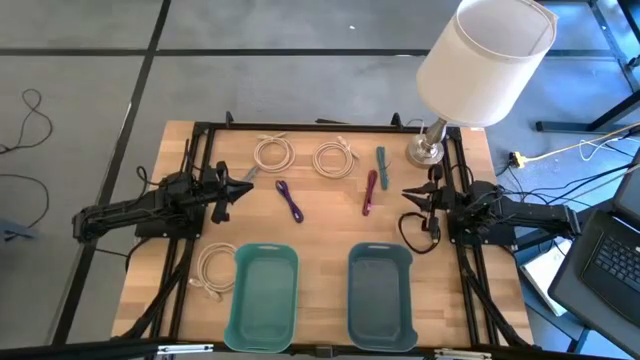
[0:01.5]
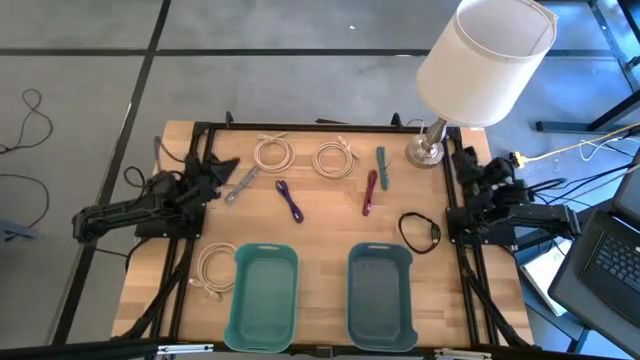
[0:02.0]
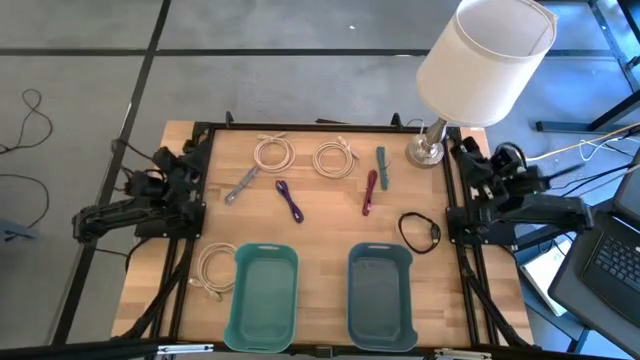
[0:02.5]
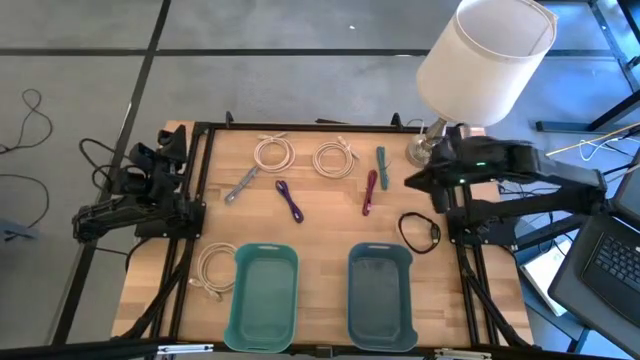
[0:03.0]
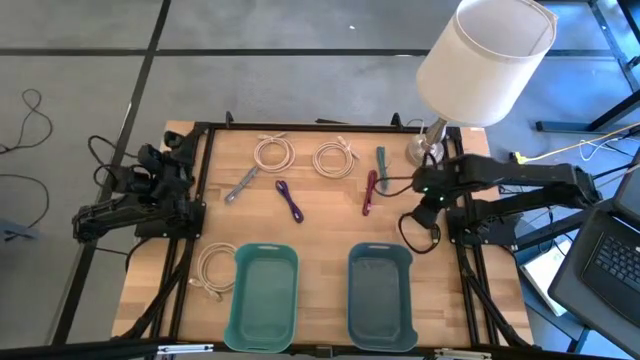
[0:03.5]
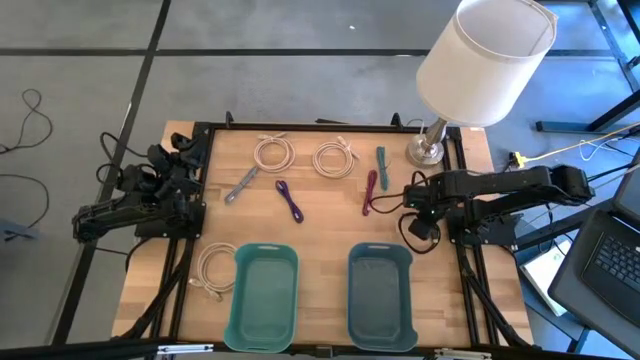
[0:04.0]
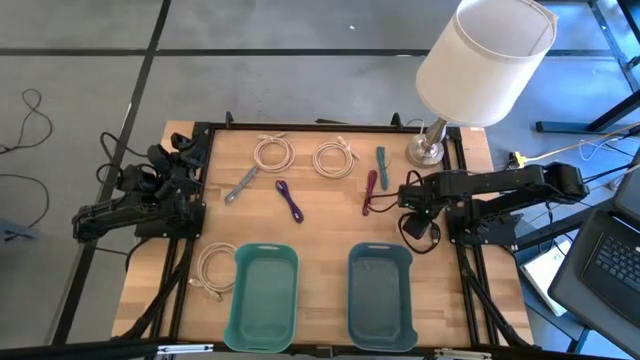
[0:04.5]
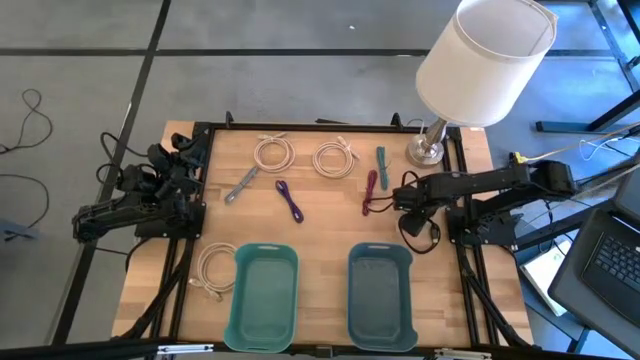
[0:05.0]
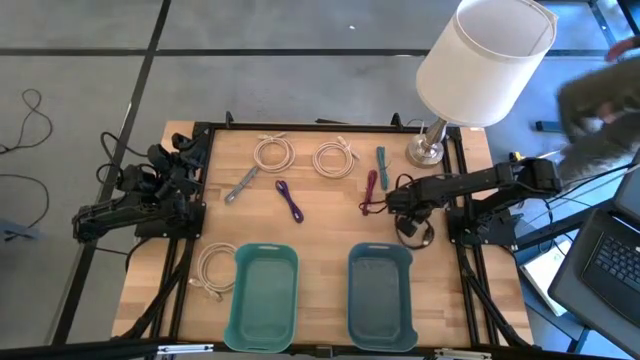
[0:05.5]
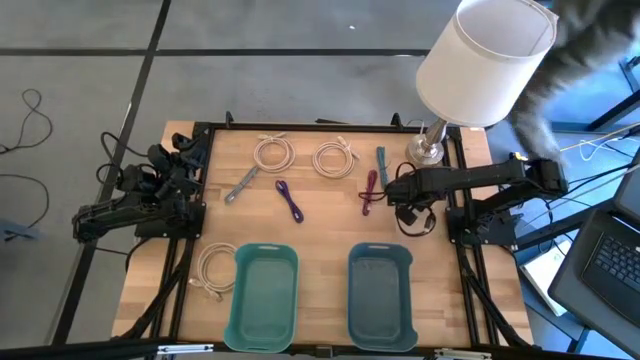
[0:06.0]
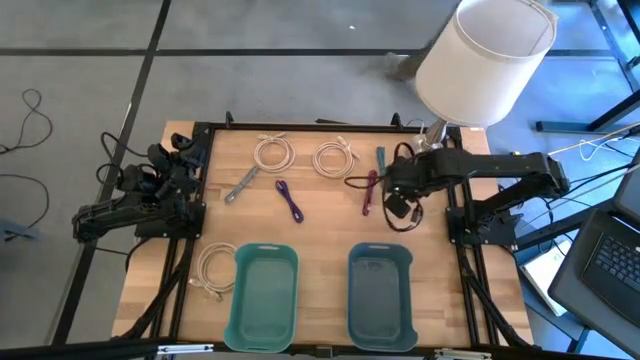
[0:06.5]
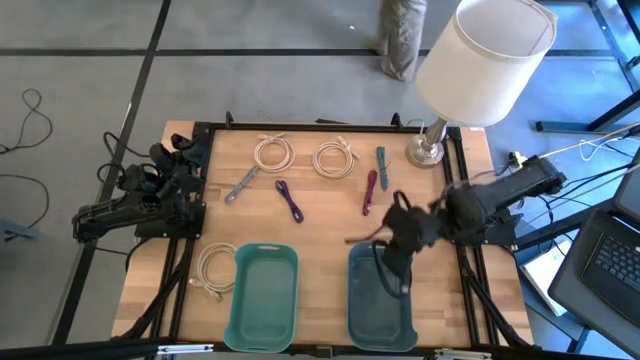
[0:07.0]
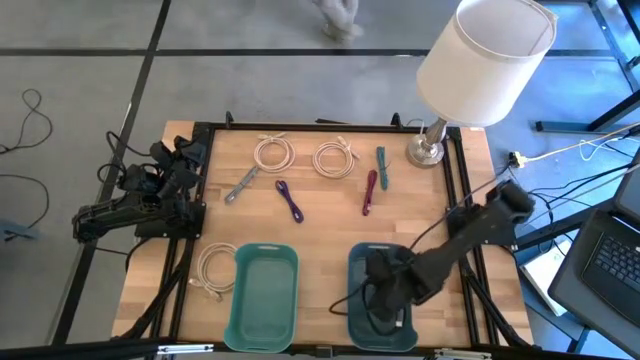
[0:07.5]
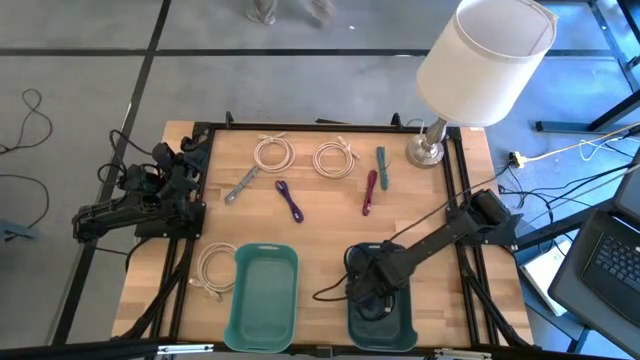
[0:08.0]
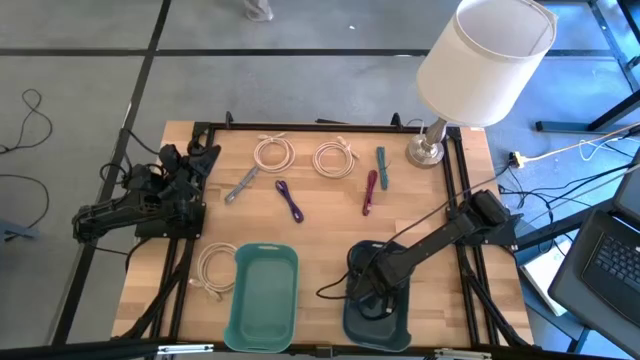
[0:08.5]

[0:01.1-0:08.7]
Task: Pick and place USB-C Cables
Put the large black USB cable into the blue bin

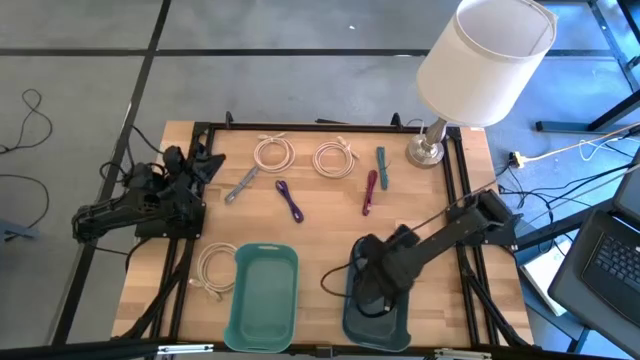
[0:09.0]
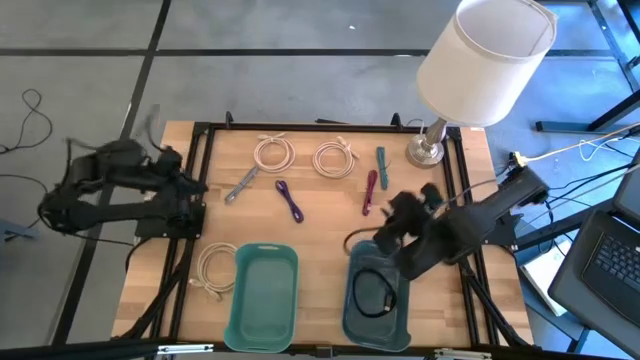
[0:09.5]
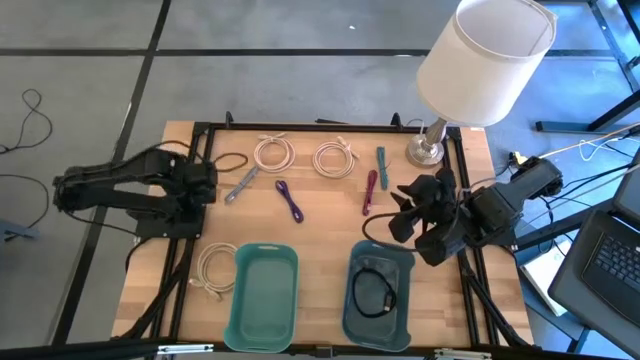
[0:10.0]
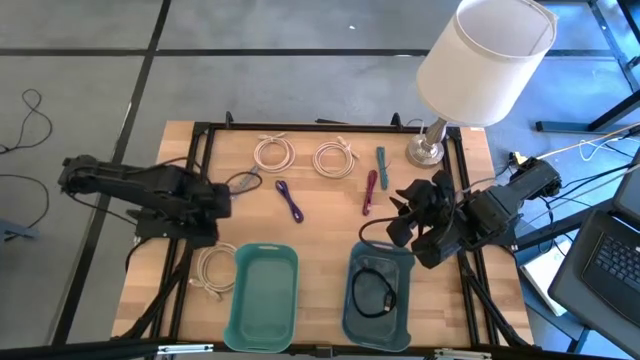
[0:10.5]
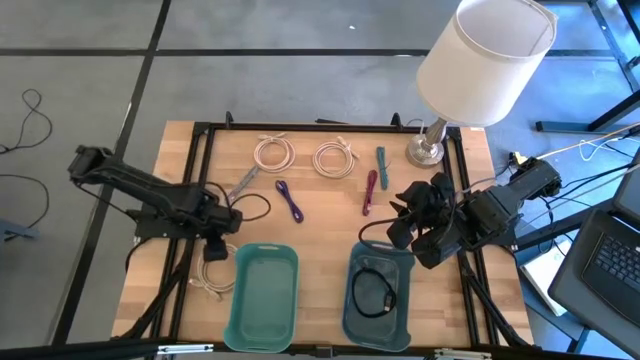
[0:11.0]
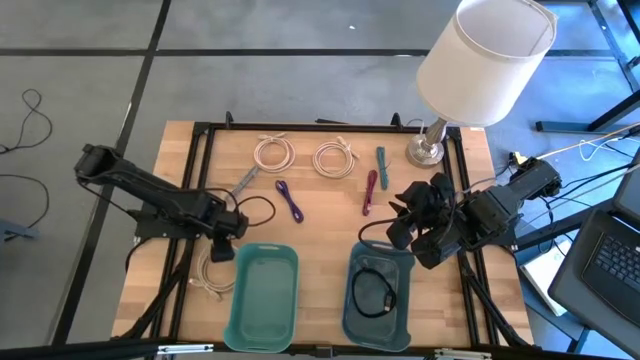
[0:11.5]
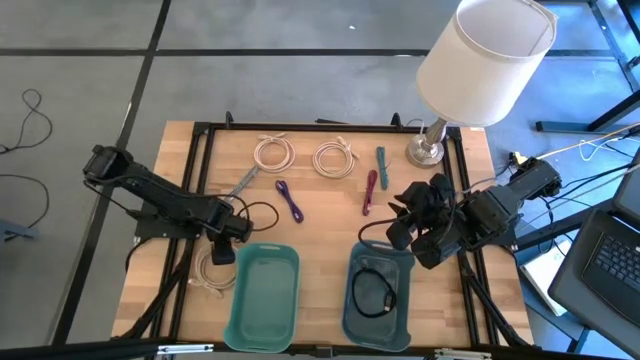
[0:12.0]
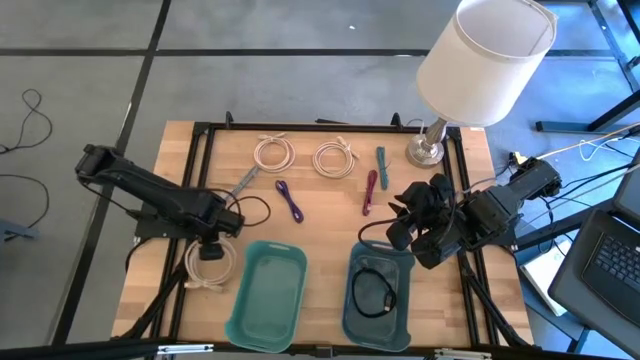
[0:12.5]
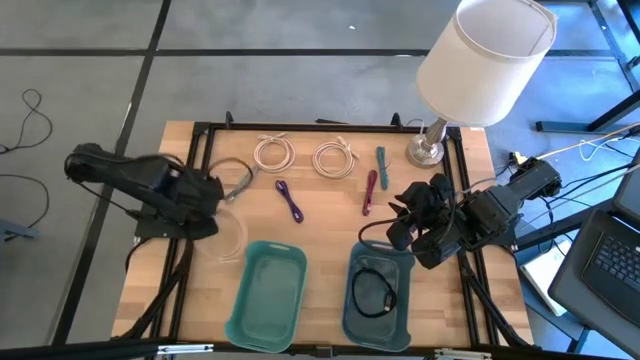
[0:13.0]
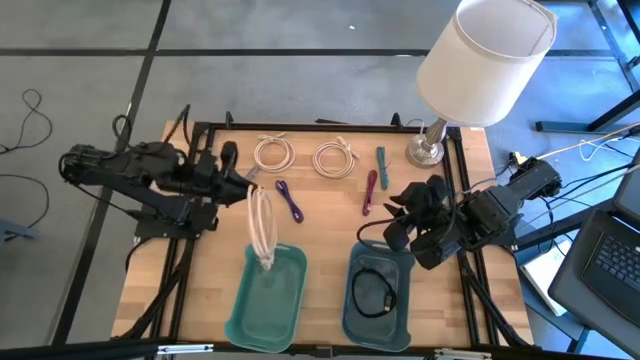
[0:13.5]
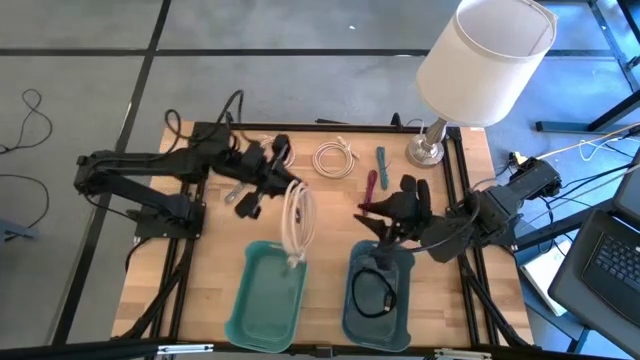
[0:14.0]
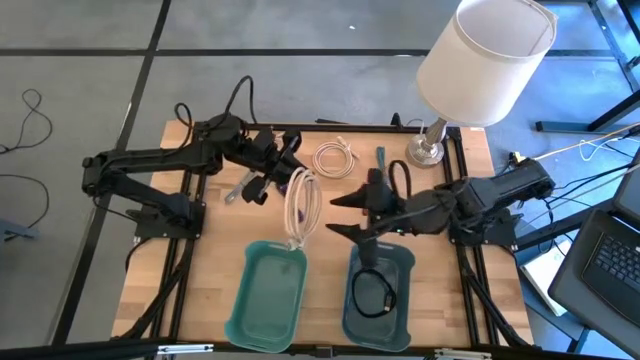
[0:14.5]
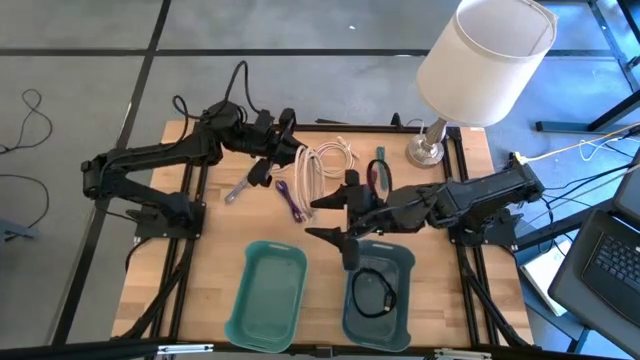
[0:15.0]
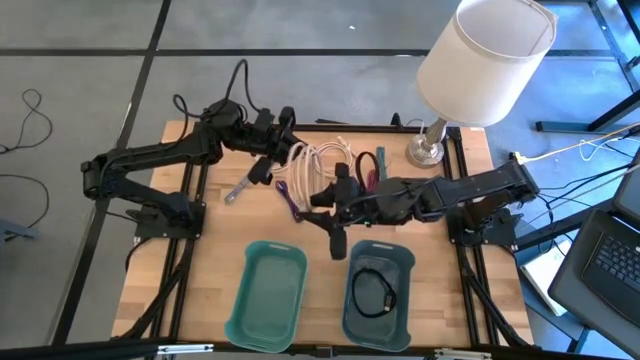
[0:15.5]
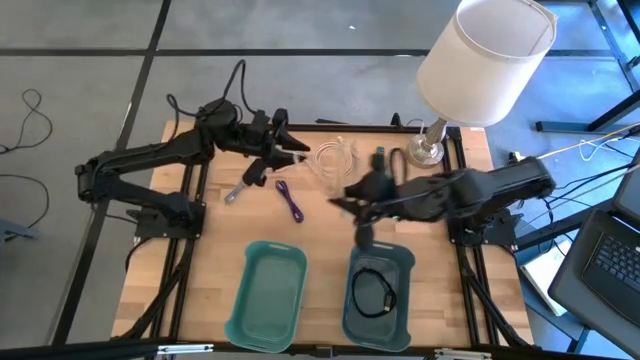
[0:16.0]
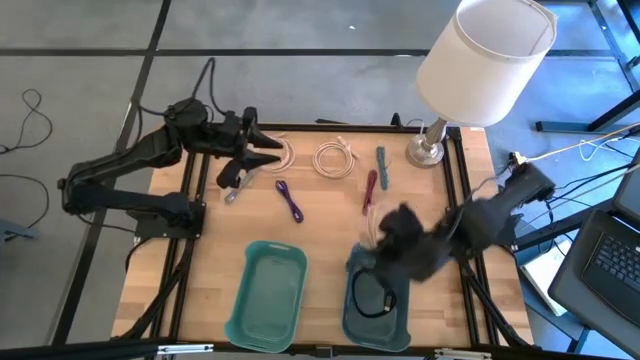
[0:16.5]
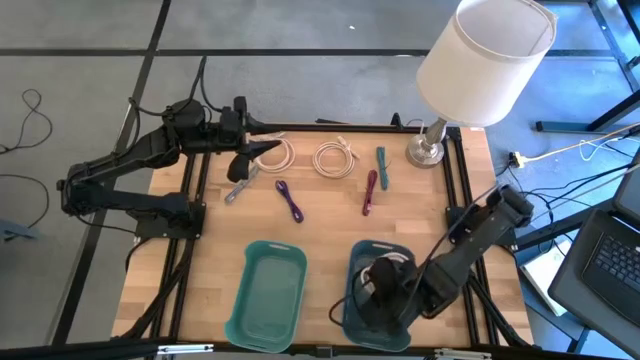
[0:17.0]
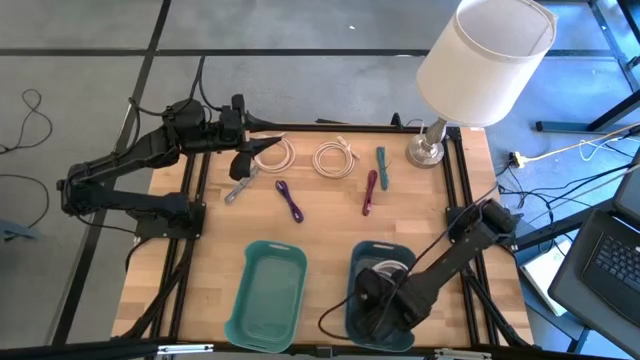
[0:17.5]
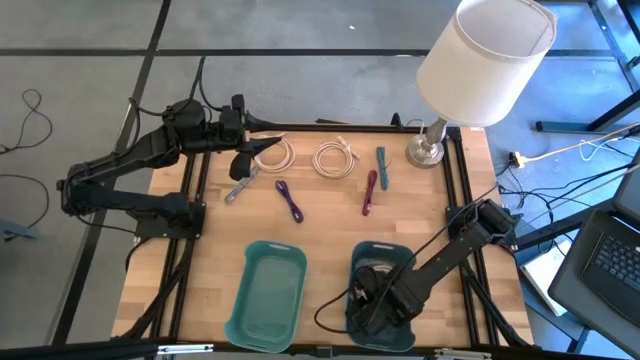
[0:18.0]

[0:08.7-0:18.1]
Put the bottom brown HDMI cable into the blue bin

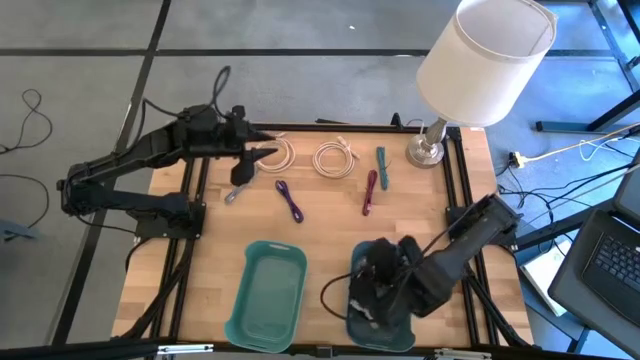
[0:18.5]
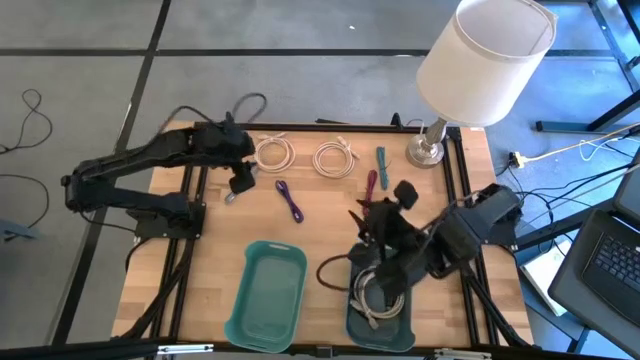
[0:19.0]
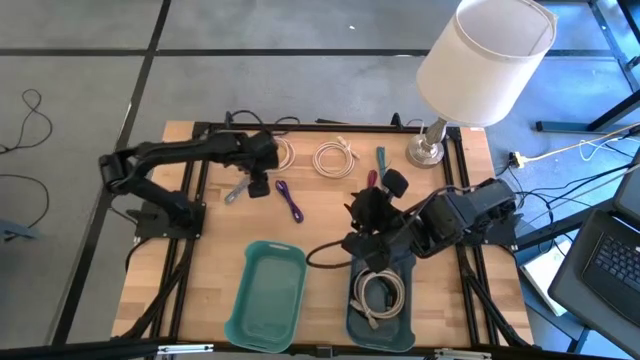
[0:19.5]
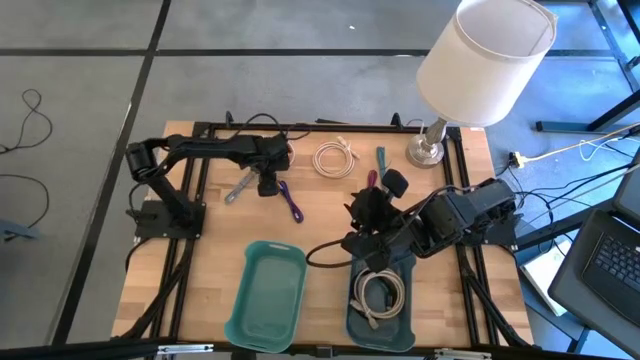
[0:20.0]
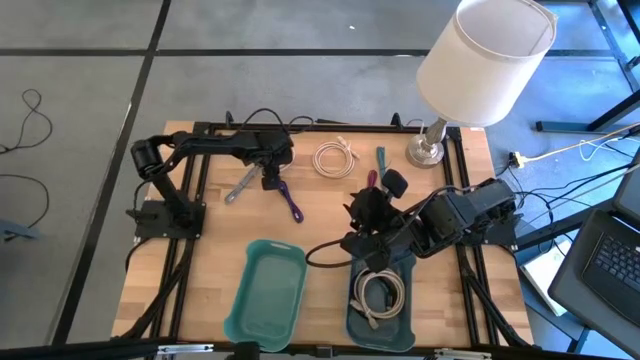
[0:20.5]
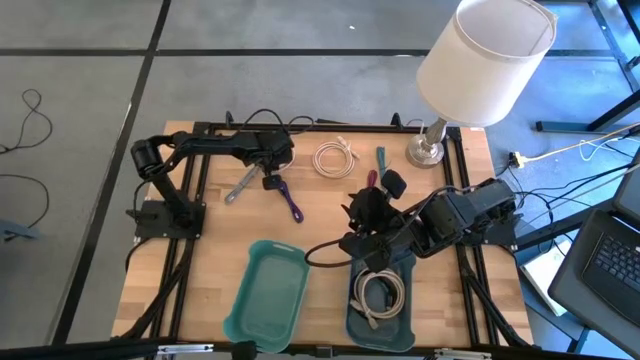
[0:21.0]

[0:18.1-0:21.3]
Put the left brown HDMI cable into the blue bin

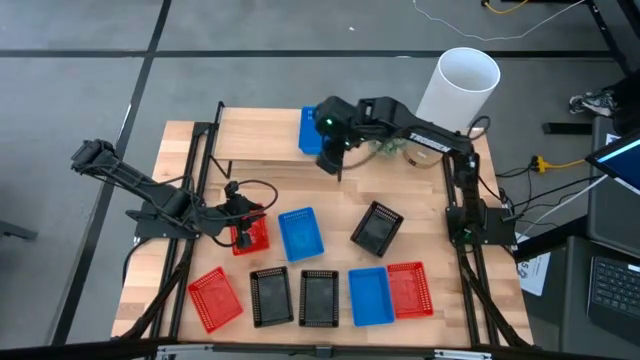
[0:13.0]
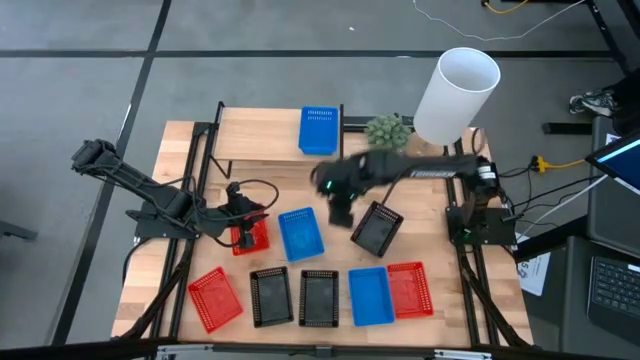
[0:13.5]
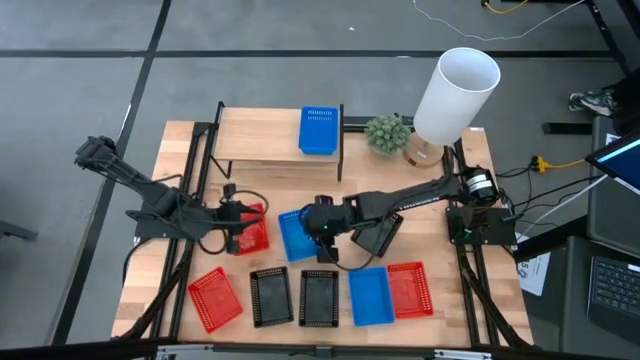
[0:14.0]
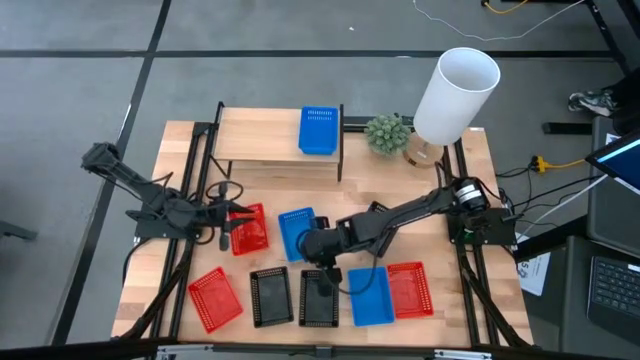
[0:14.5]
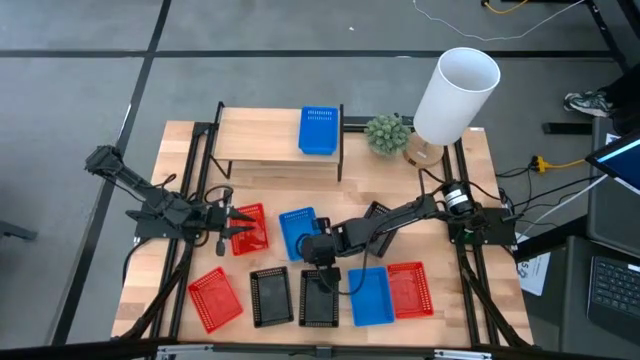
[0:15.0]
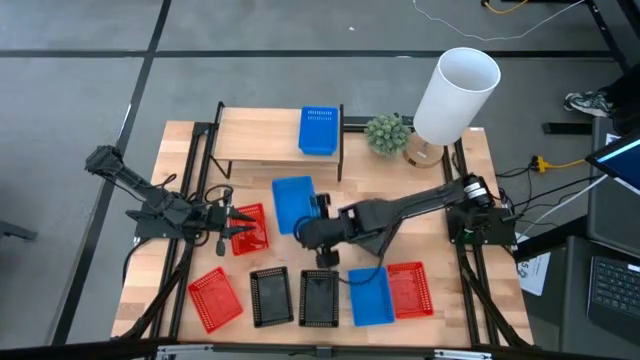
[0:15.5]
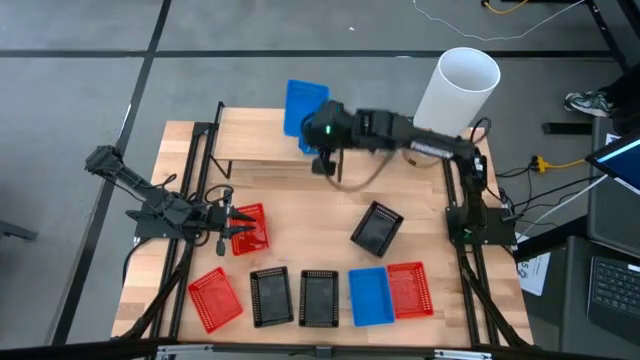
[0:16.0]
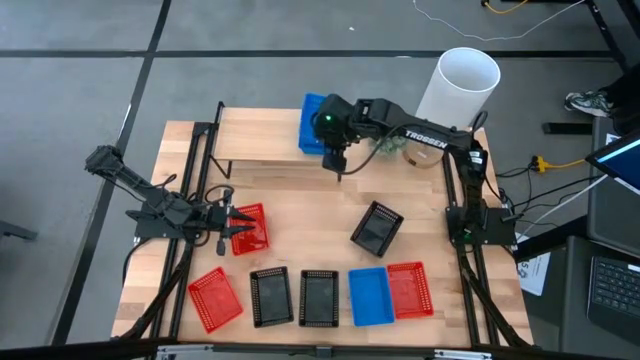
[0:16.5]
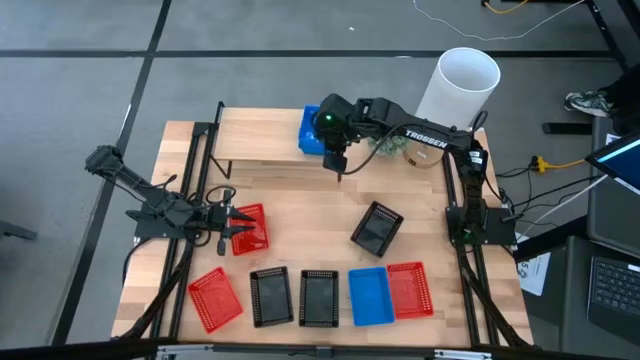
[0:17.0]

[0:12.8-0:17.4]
Task: Stack baskets on shelf by color
Stack the top blue bin on top of the blue bin on the shelf
